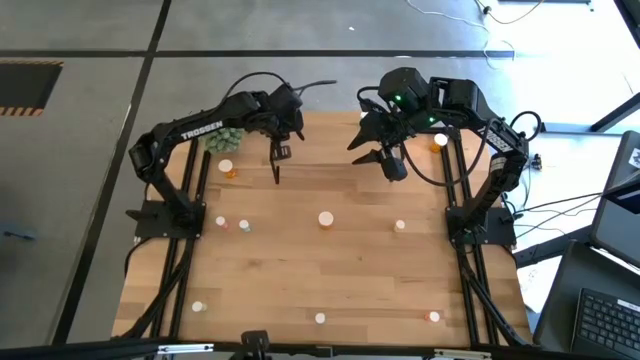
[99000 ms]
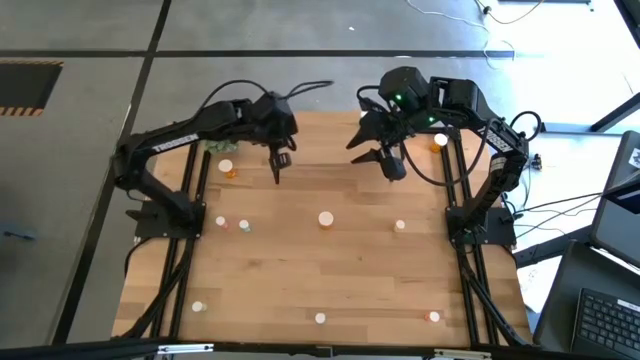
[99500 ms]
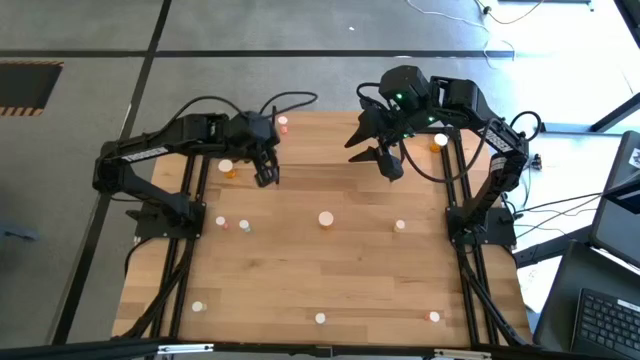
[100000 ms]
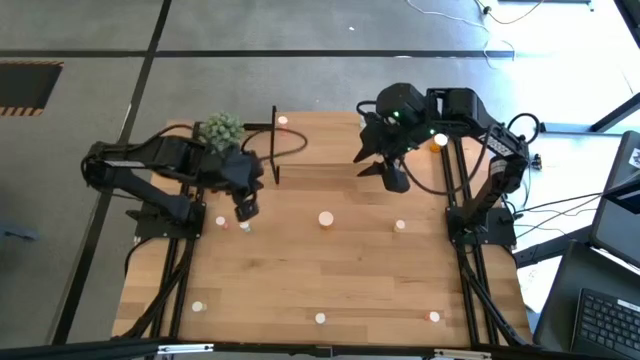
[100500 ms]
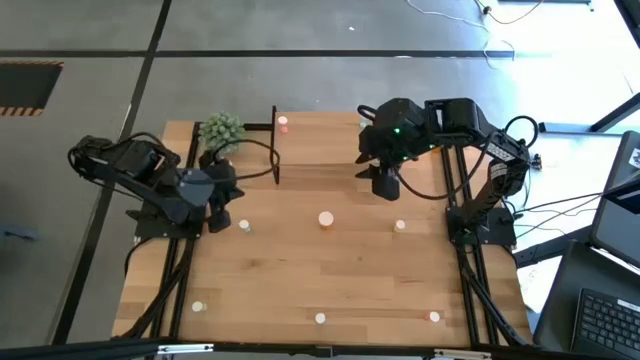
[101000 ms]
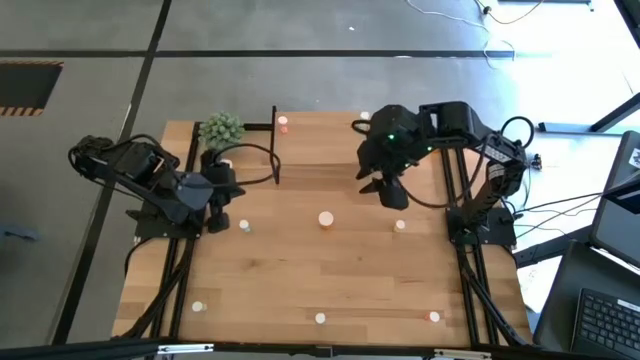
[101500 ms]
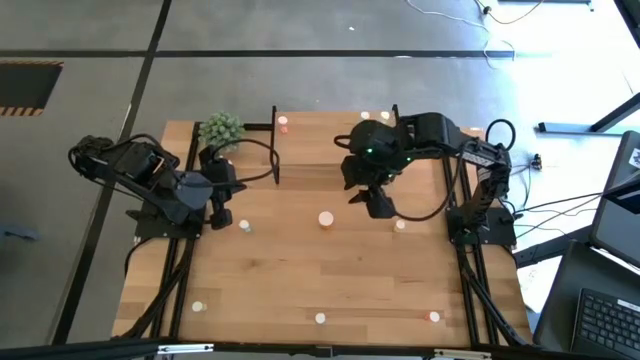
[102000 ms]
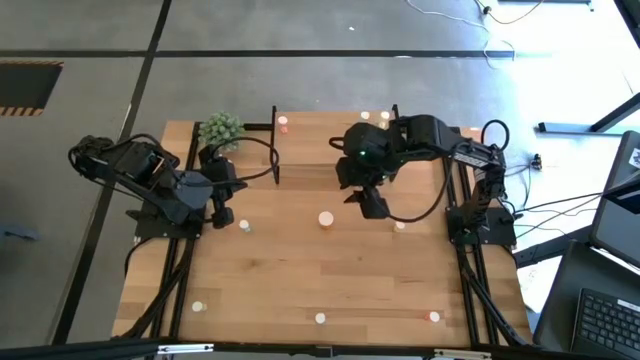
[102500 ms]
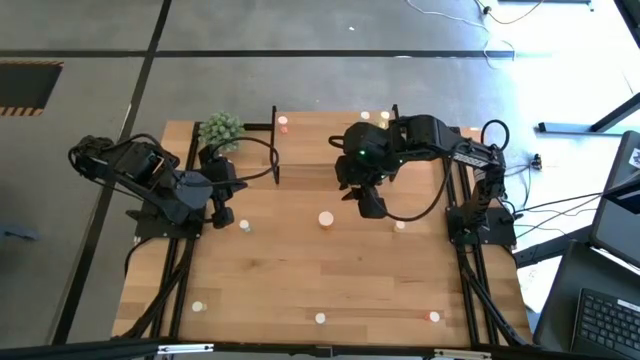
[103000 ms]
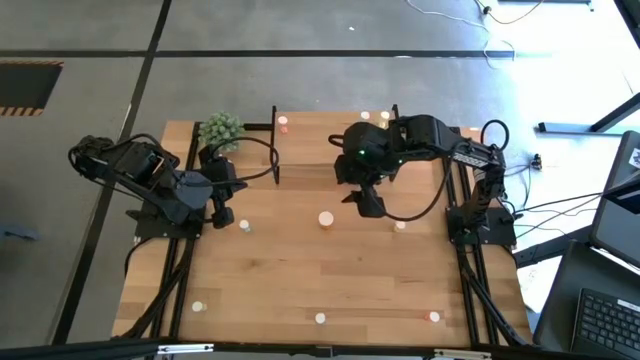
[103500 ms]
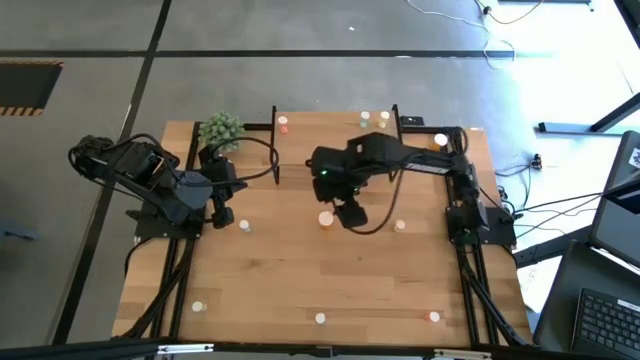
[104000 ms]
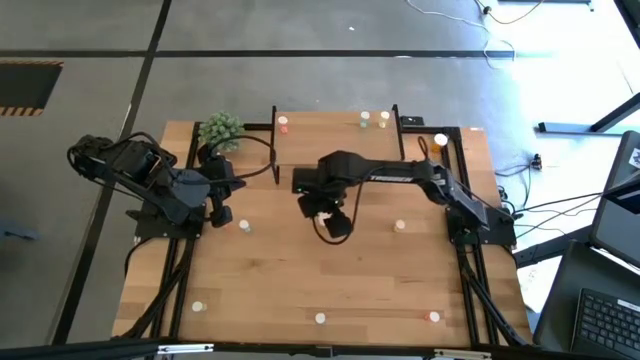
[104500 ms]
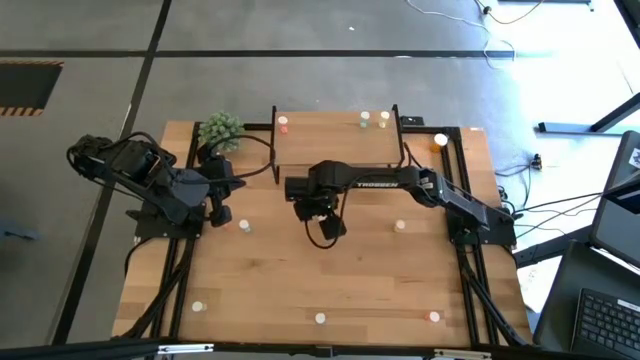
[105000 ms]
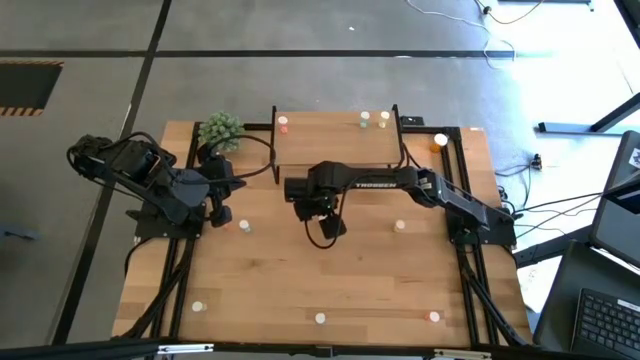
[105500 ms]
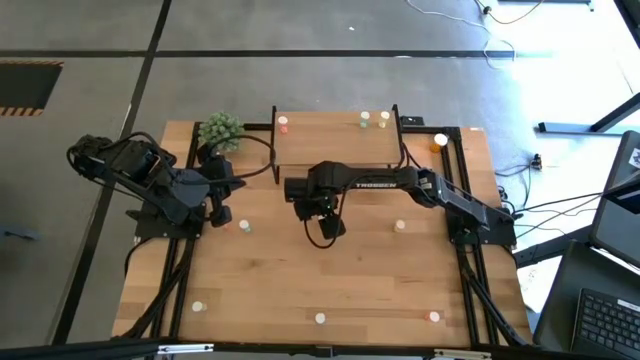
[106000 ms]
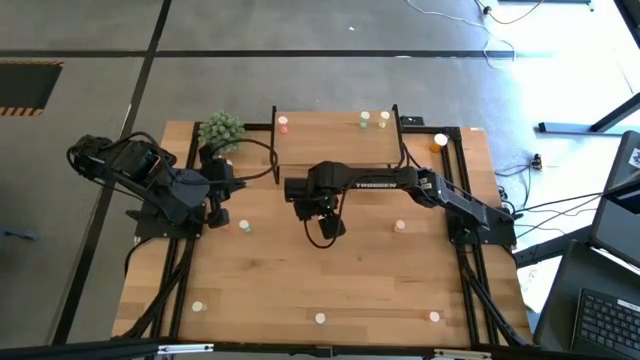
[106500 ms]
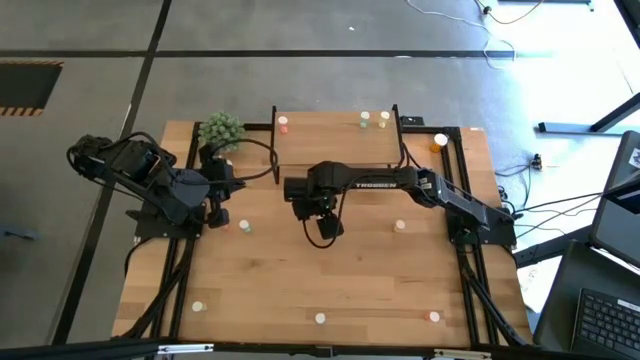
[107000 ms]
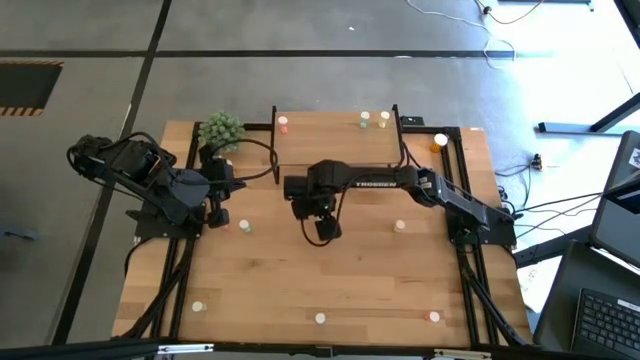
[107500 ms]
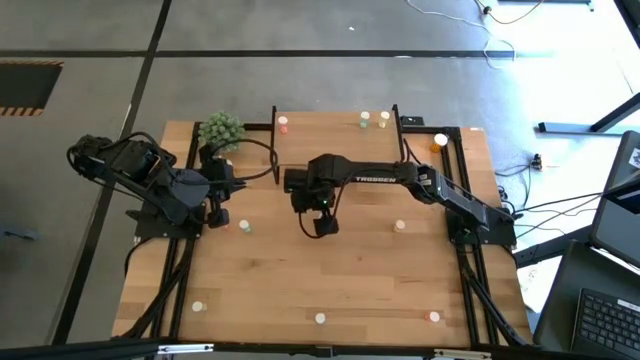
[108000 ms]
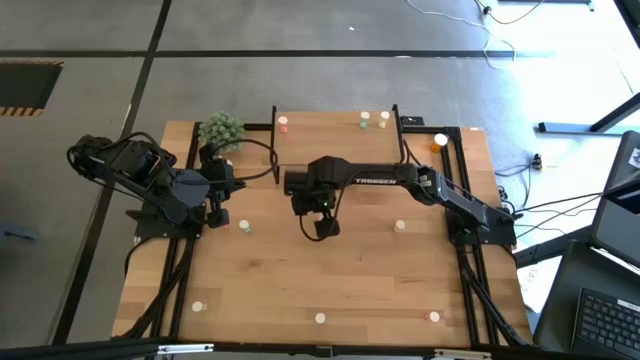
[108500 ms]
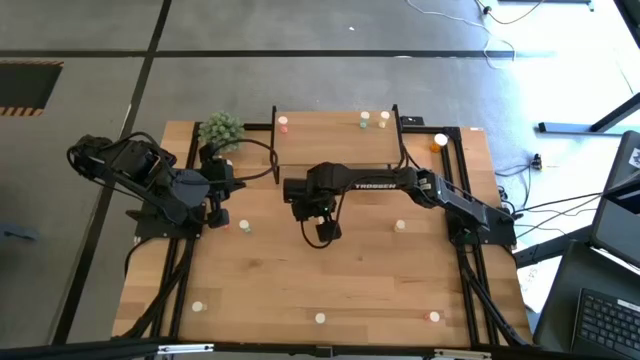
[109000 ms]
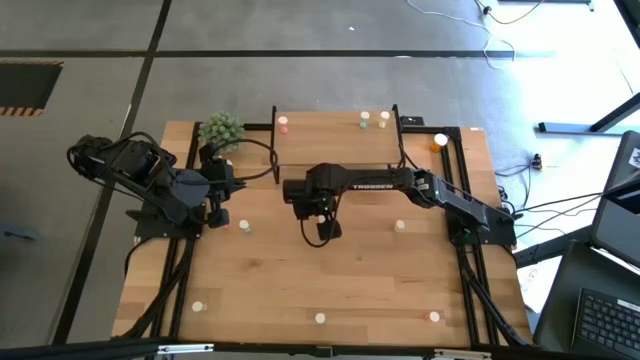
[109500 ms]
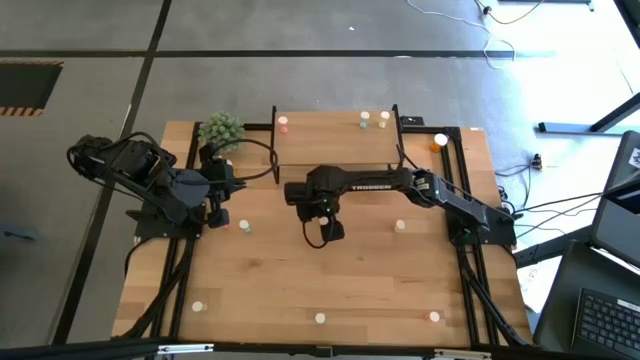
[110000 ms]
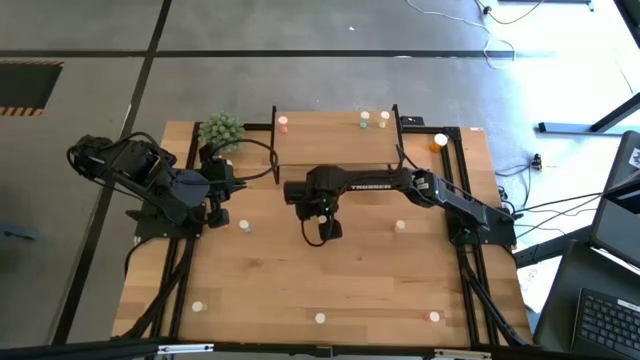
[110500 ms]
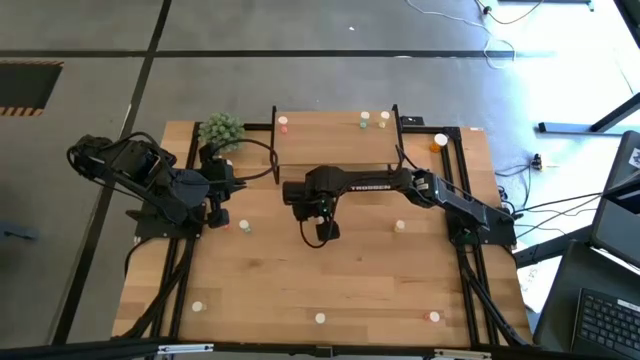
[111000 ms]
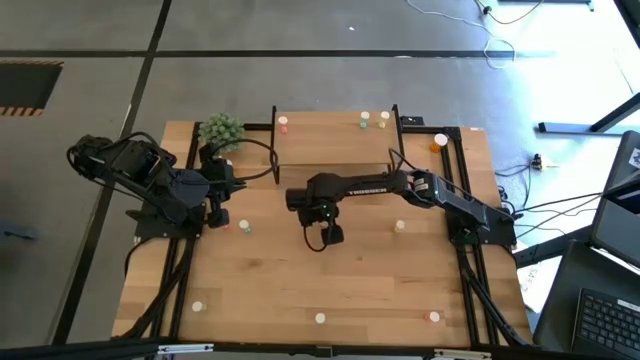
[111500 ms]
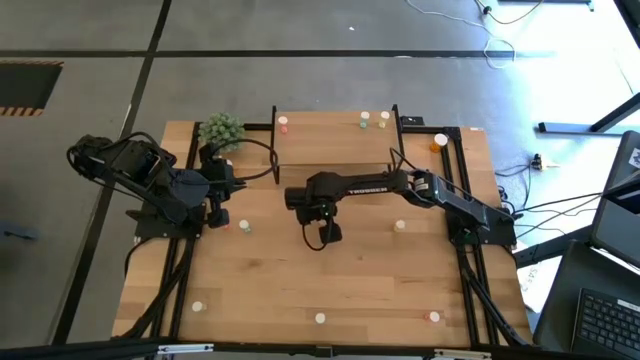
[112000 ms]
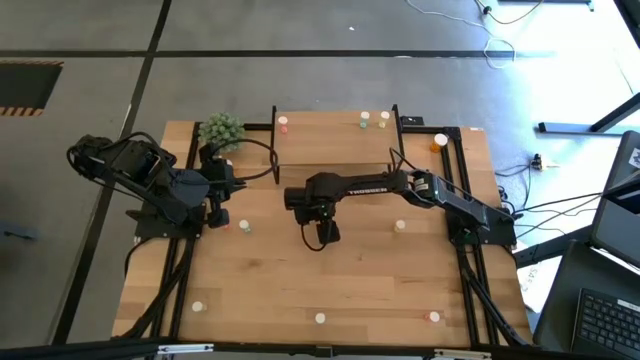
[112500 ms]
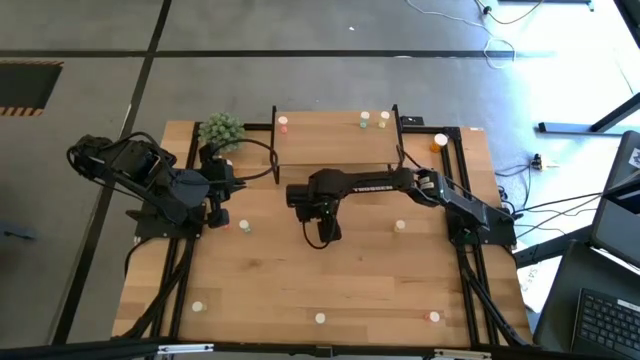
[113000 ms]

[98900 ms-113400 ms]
Task: Pick and place medicine bottles onto shelf by color
Put the center orange medicine bottle on the shelf

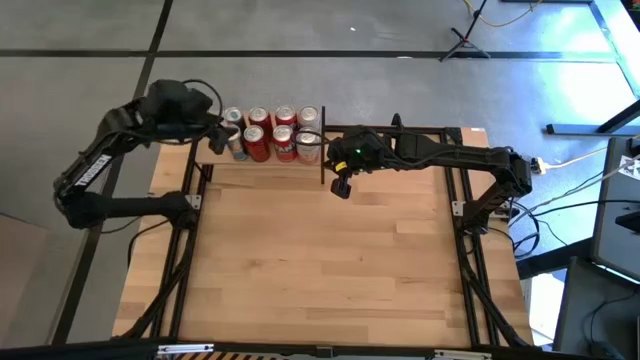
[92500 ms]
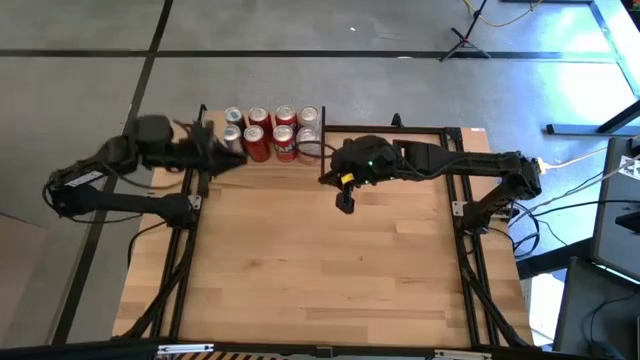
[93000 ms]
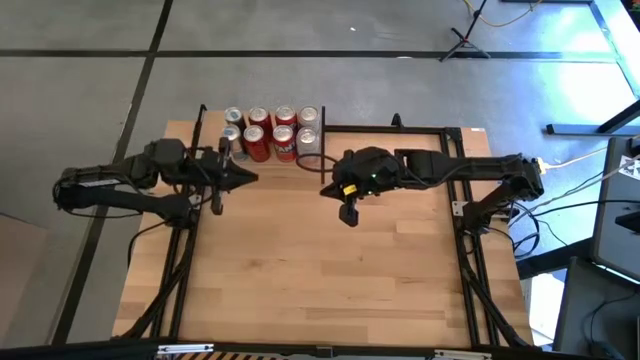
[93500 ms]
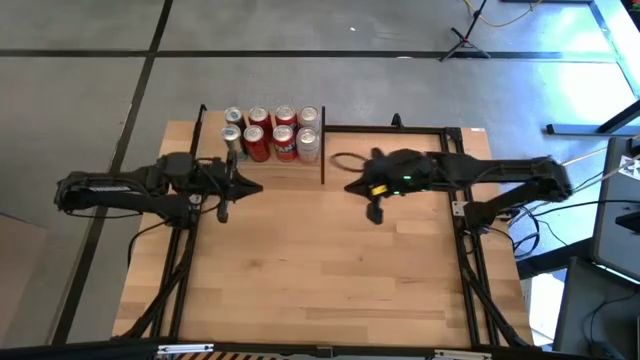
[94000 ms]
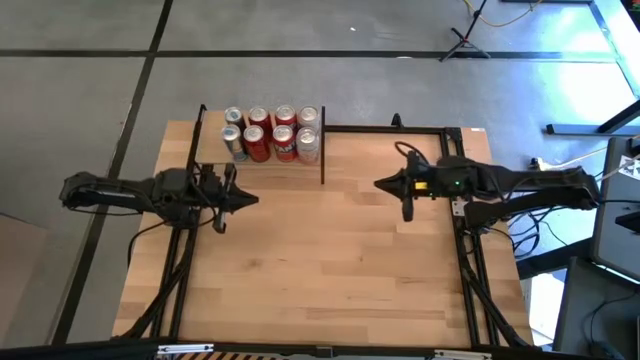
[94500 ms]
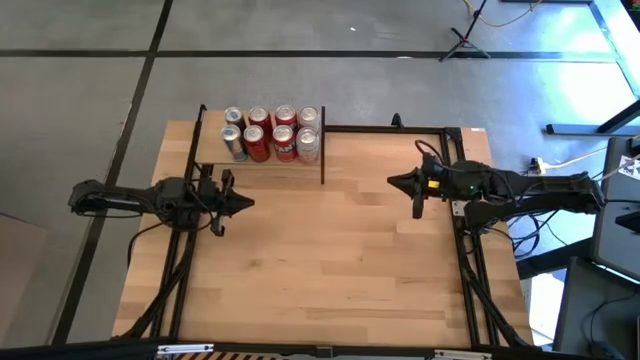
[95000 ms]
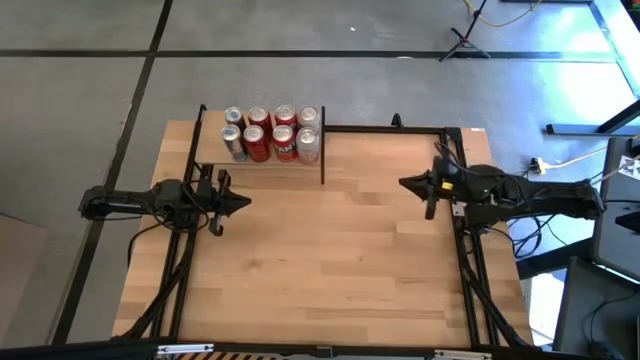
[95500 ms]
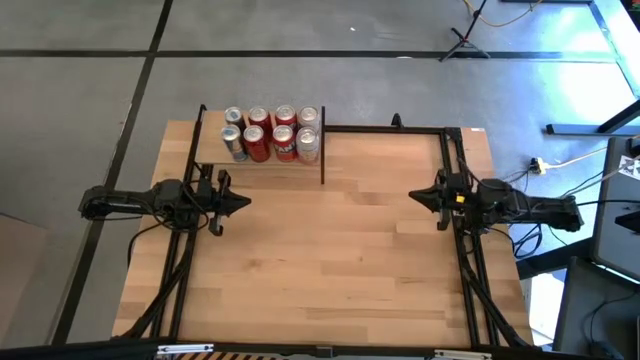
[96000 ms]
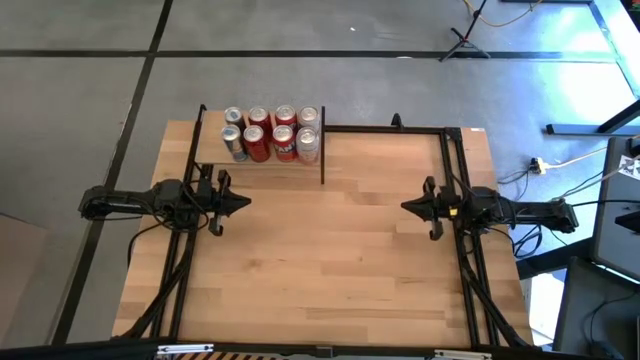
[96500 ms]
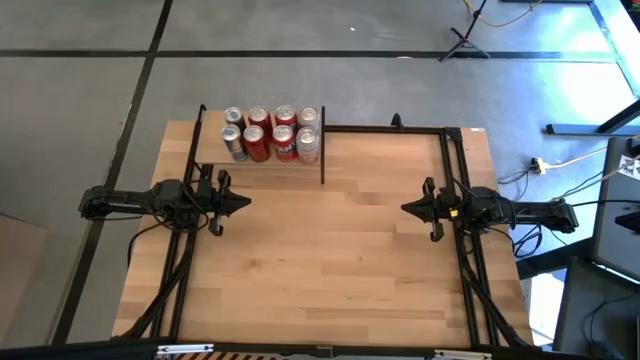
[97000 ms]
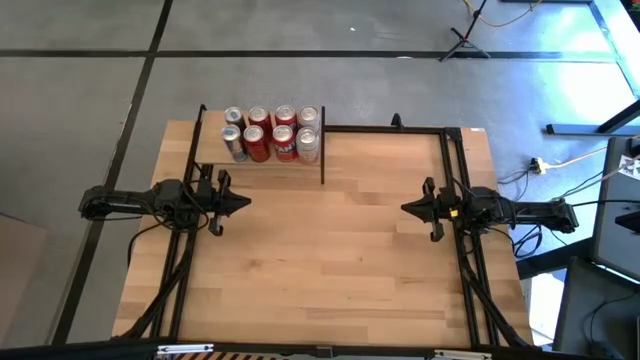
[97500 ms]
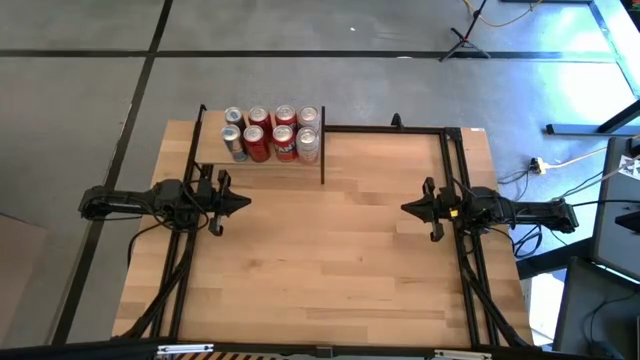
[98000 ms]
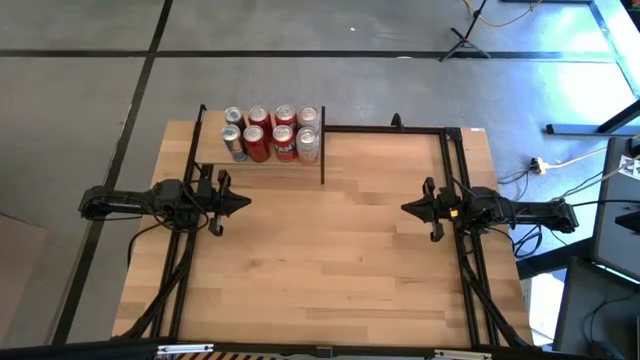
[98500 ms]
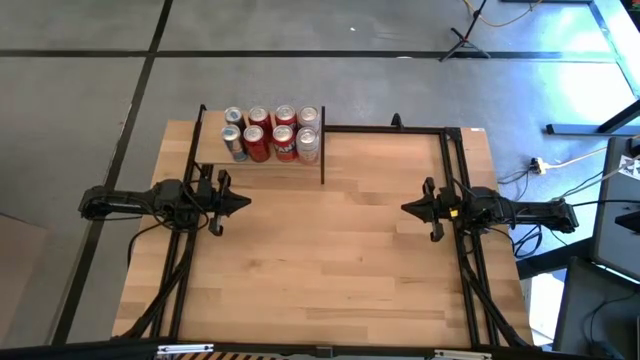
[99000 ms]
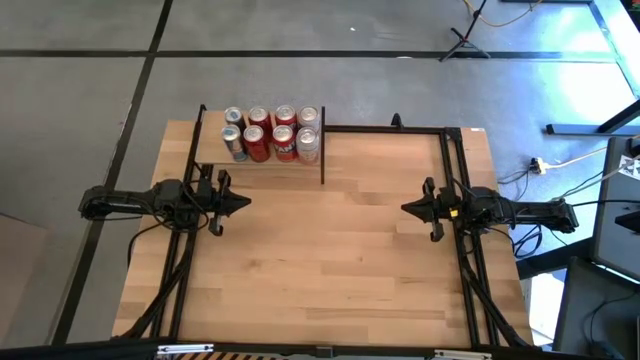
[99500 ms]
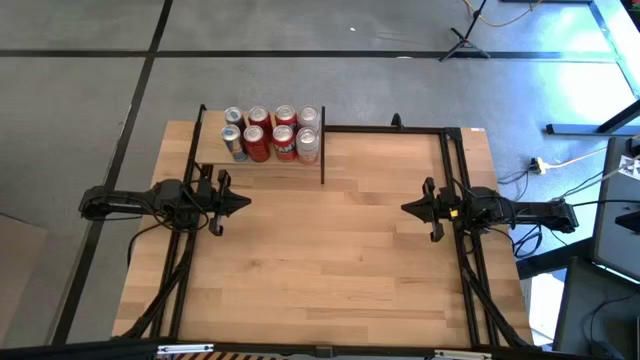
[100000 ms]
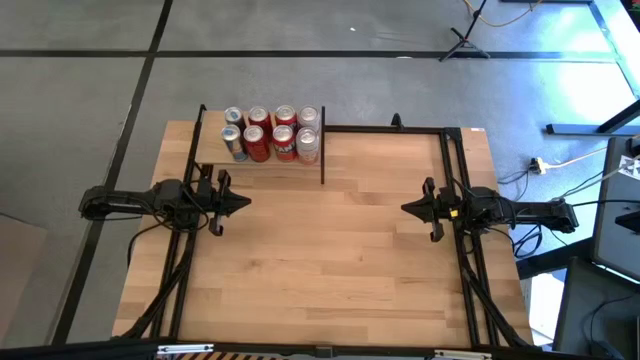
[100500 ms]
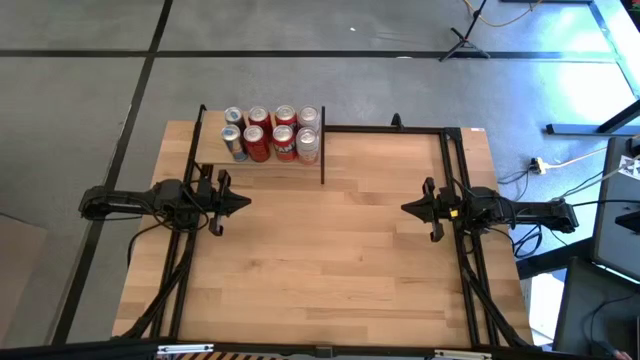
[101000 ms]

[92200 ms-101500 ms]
Task: Place canned beverage on shelf
Return to Home Position
